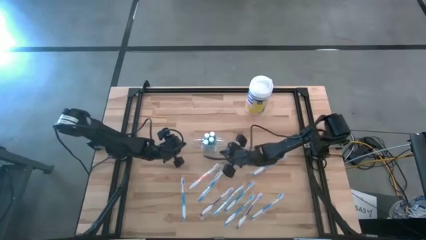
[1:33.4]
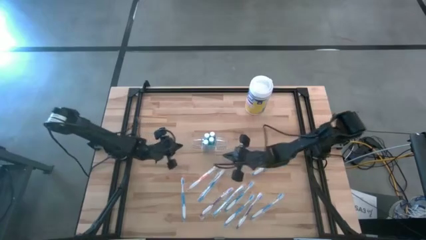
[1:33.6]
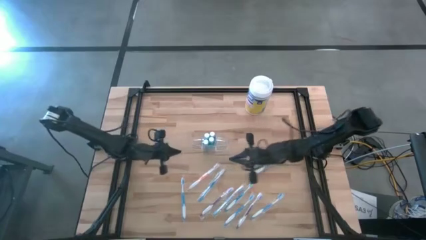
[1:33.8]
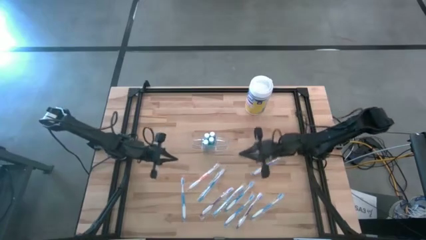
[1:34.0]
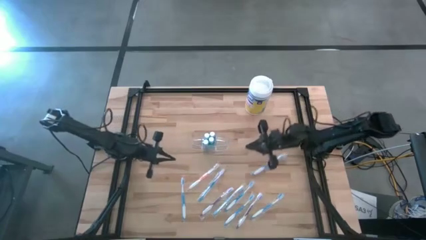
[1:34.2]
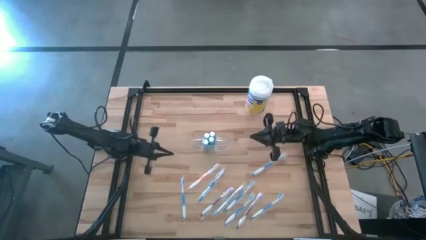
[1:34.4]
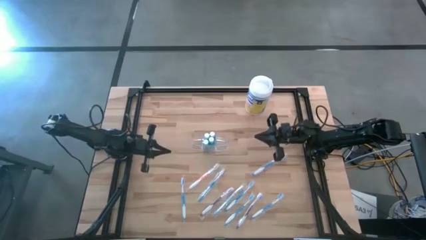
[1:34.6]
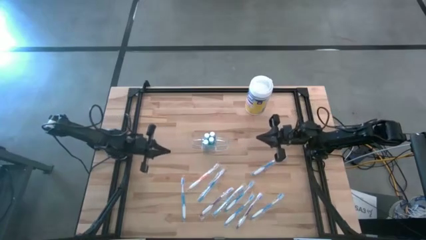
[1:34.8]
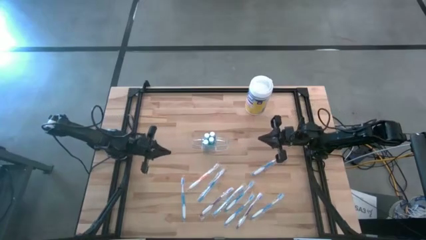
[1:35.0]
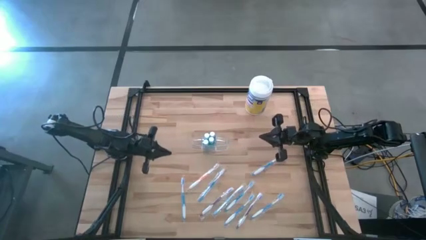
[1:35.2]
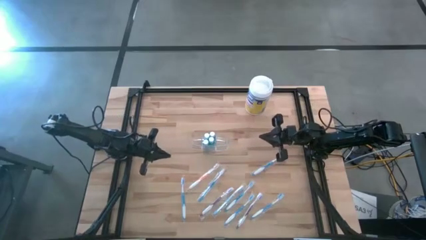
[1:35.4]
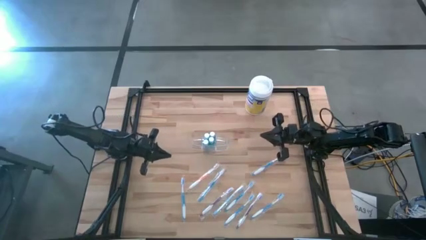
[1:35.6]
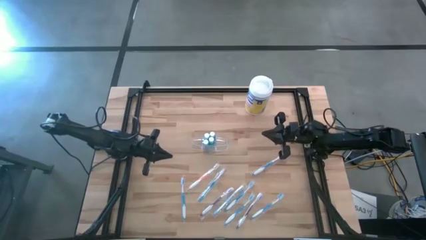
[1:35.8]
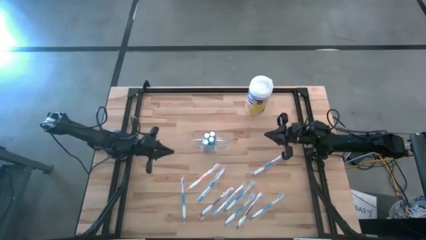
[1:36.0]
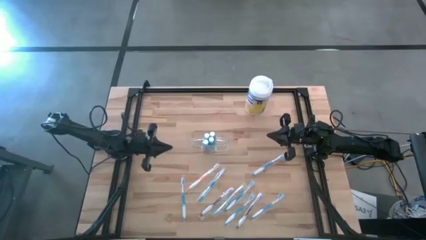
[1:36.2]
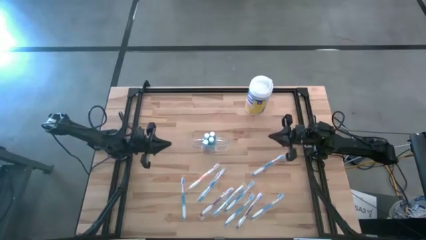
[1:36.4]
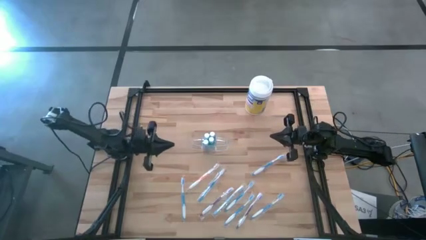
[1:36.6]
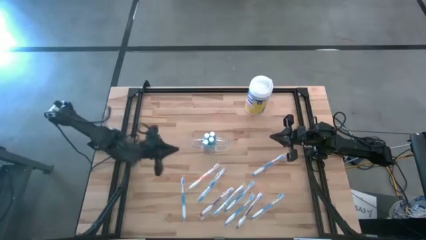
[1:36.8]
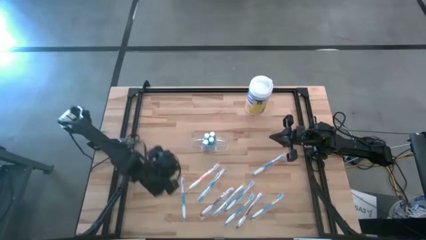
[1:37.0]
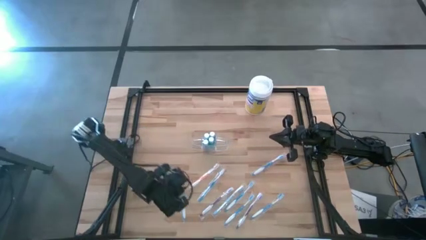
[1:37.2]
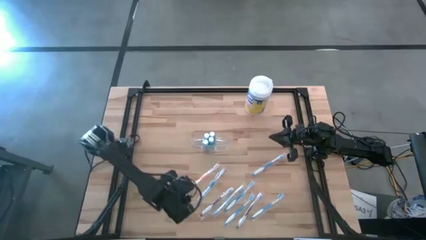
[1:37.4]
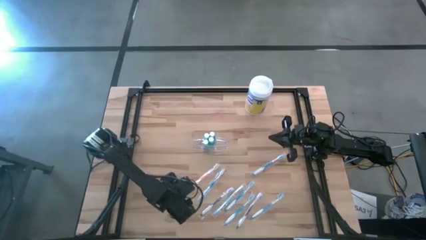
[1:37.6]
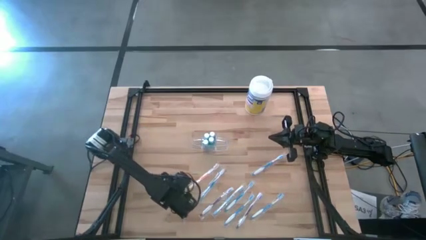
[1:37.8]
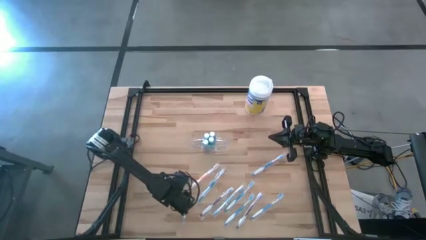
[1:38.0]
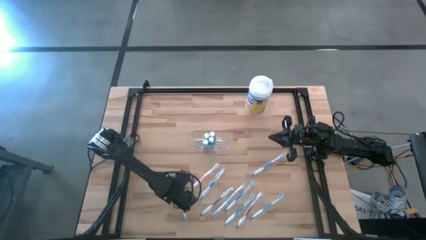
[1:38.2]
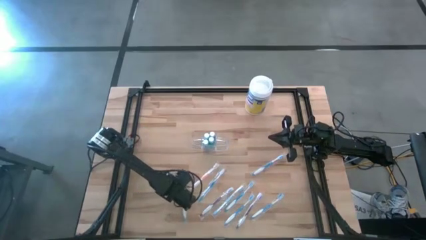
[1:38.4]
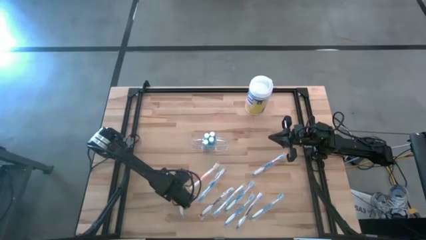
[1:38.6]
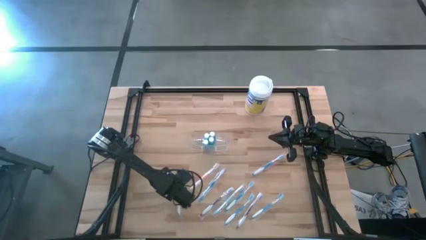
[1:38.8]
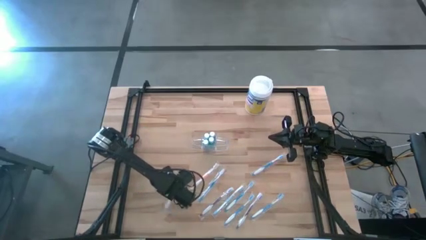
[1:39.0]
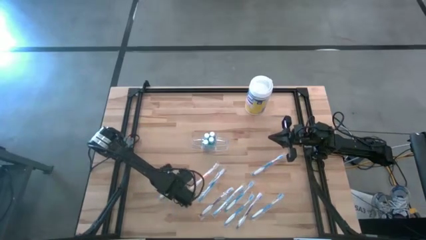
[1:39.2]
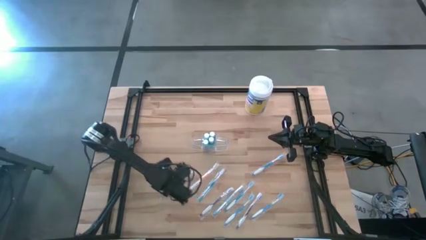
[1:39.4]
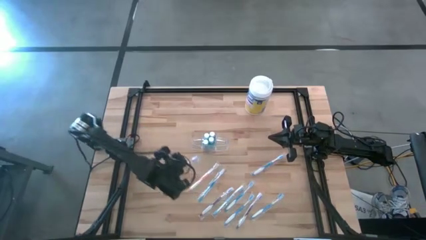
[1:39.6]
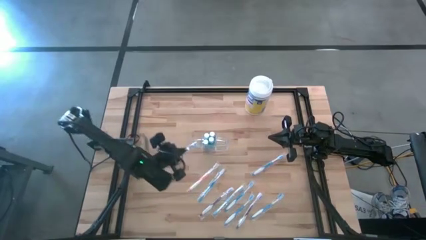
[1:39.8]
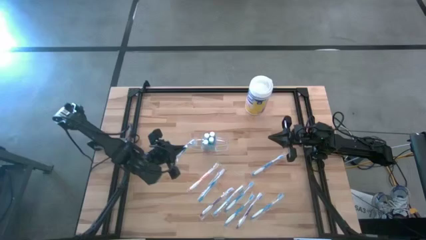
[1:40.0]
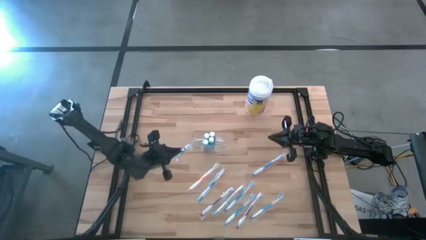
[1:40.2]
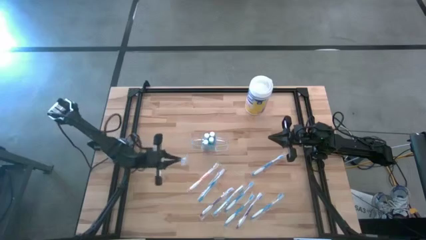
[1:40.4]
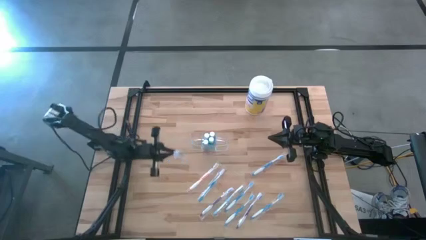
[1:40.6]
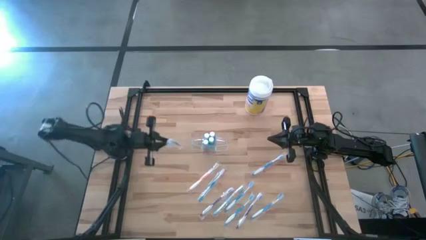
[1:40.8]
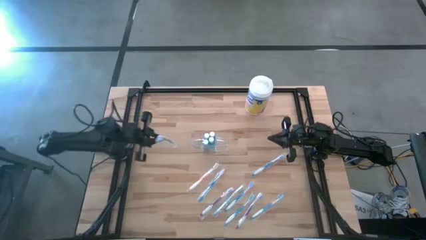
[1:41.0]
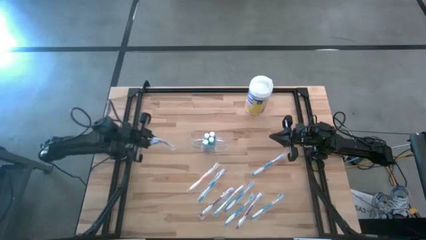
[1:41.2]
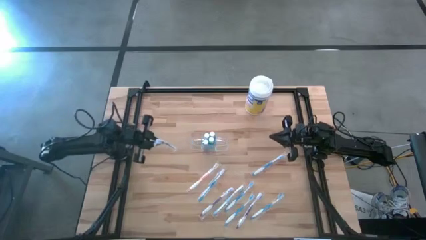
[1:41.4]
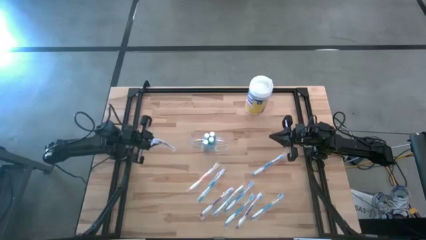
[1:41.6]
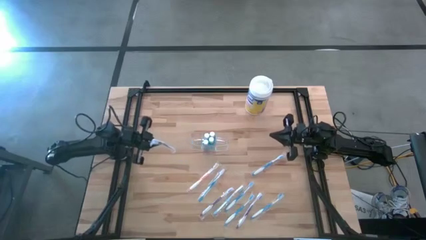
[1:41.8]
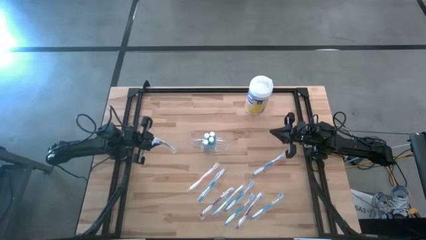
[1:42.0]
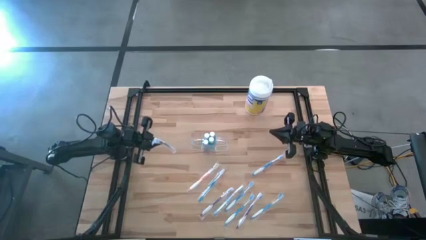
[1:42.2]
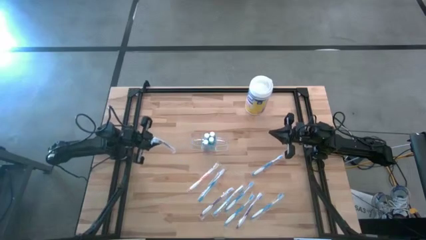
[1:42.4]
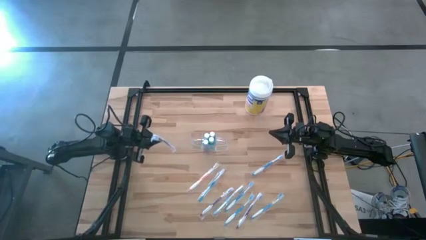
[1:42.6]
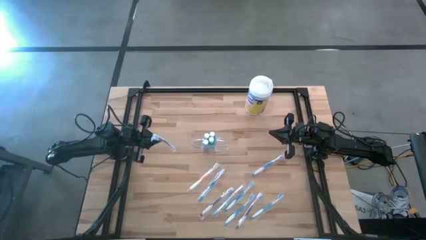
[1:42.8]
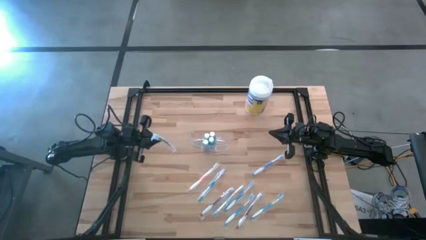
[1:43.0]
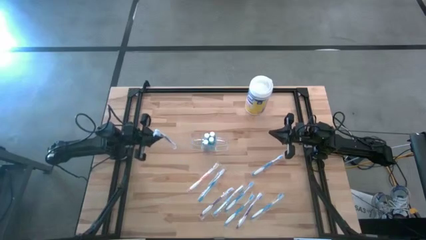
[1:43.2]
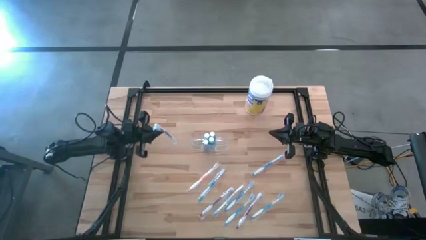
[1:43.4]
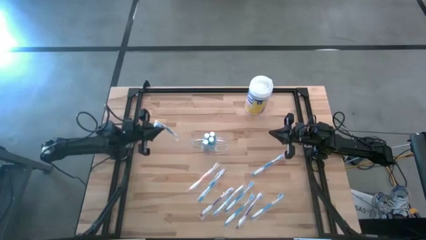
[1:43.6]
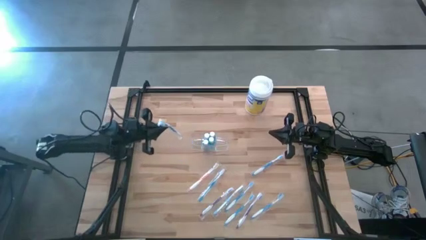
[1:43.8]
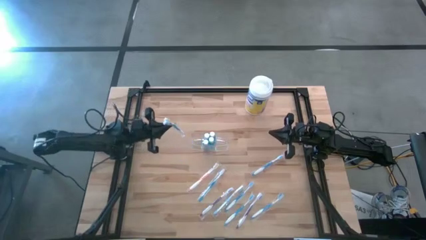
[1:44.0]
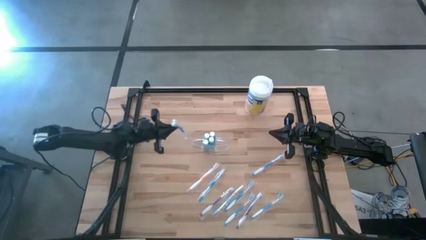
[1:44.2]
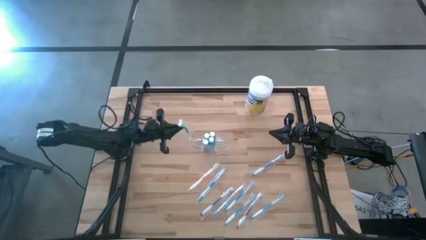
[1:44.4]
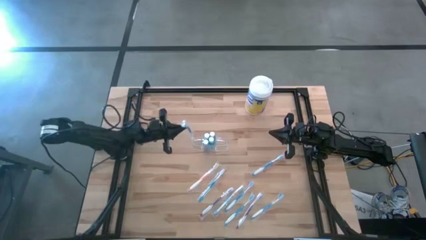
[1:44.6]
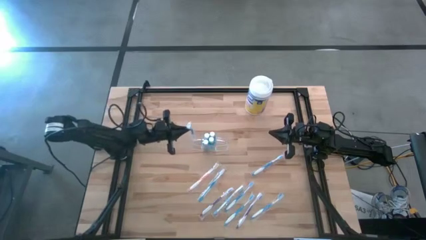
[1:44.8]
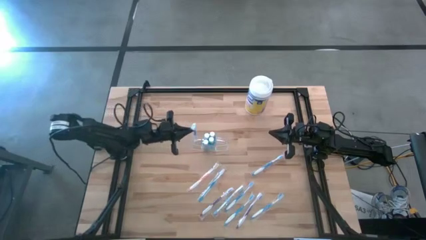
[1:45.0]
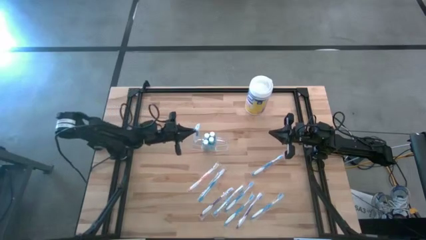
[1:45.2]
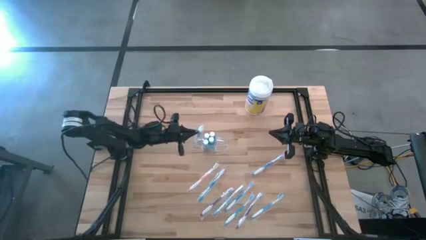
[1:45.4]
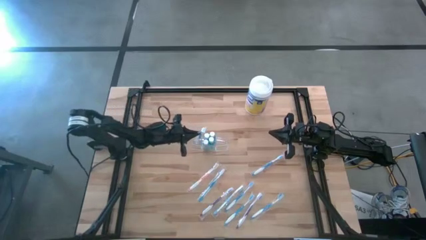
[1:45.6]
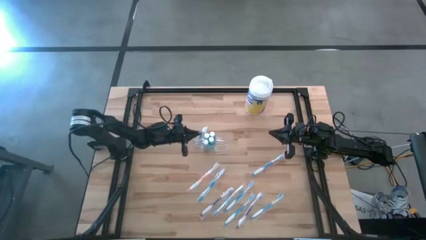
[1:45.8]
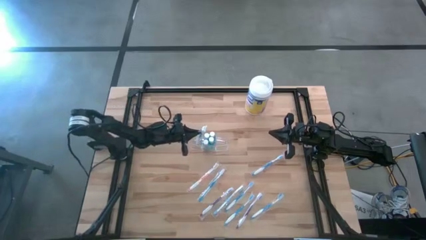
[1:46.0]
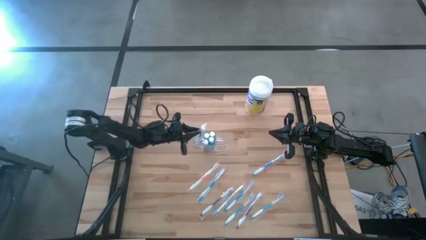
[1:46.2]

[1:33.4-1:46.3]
Task: Pick & Place toothbrushing station
Put the blue toothbrush into the transparent organizer

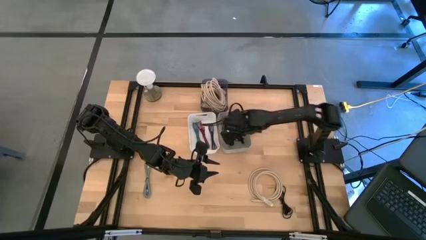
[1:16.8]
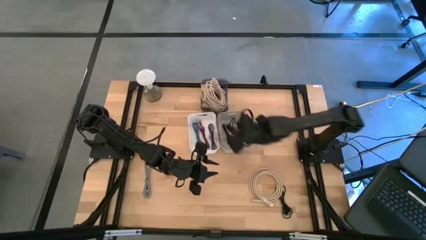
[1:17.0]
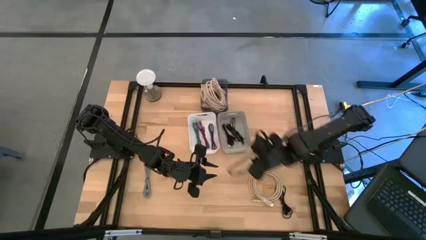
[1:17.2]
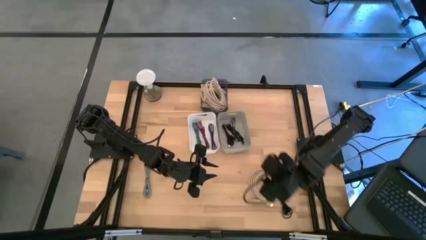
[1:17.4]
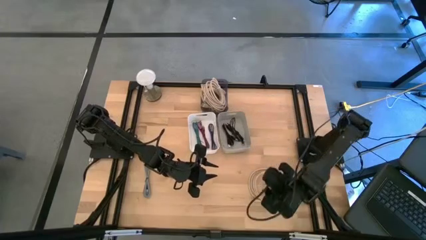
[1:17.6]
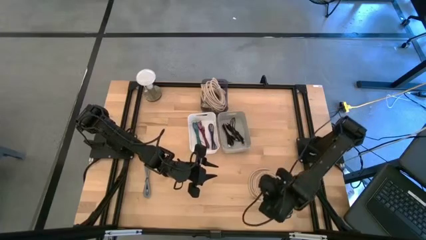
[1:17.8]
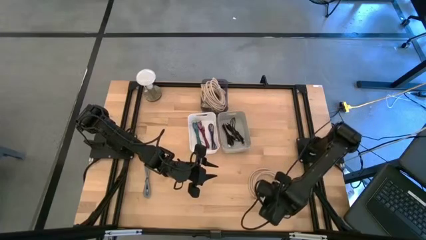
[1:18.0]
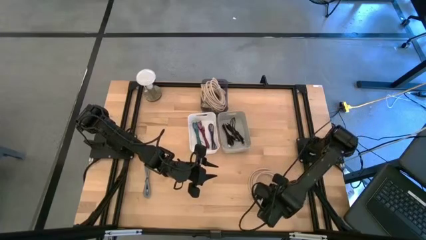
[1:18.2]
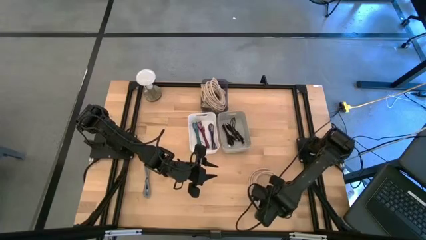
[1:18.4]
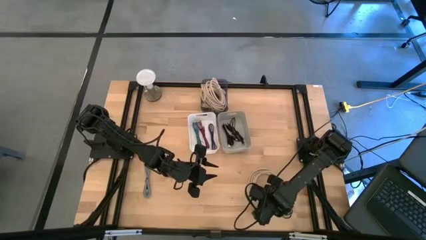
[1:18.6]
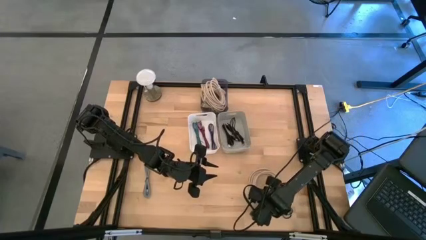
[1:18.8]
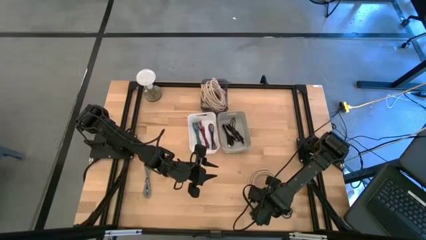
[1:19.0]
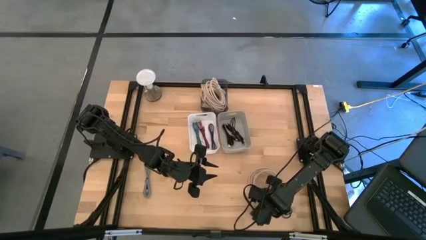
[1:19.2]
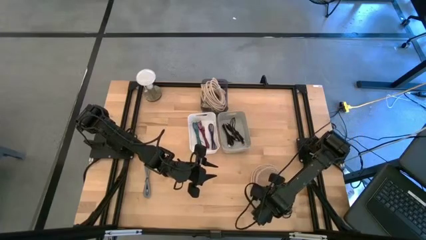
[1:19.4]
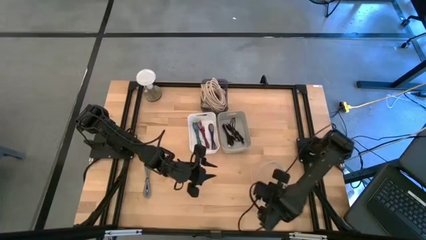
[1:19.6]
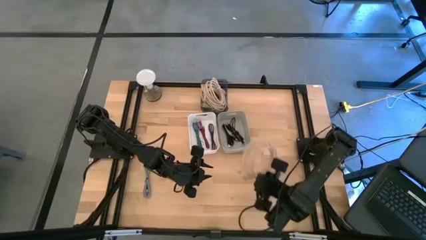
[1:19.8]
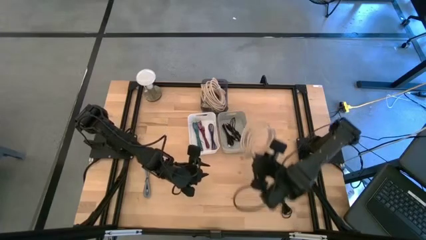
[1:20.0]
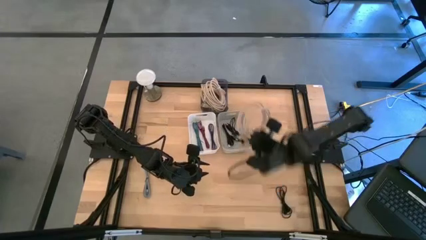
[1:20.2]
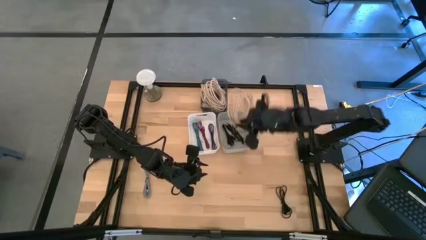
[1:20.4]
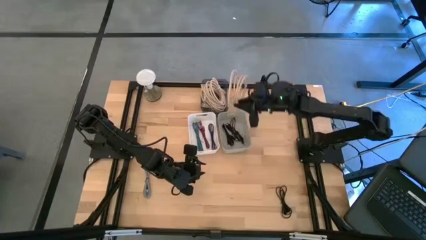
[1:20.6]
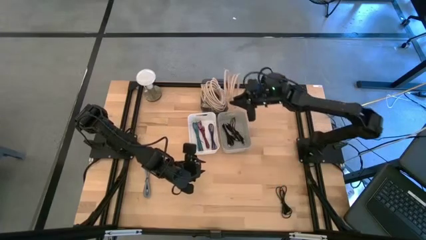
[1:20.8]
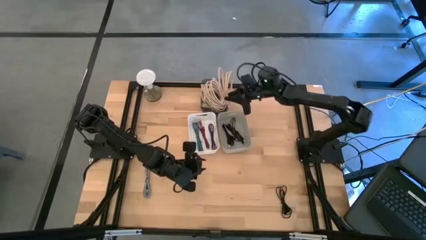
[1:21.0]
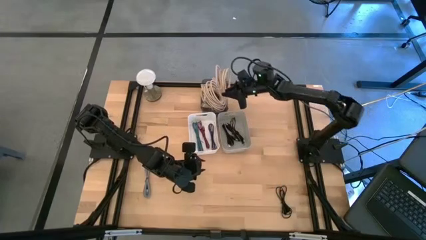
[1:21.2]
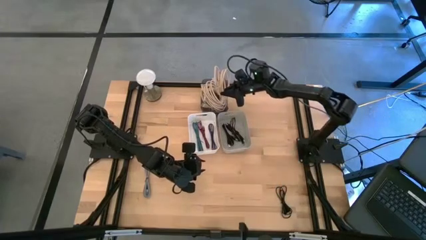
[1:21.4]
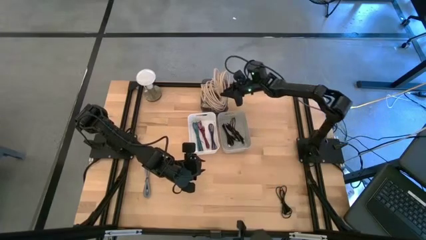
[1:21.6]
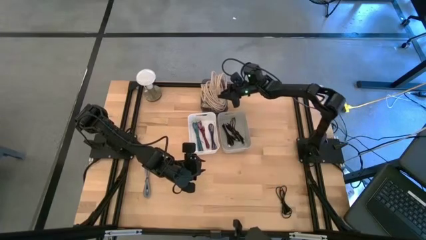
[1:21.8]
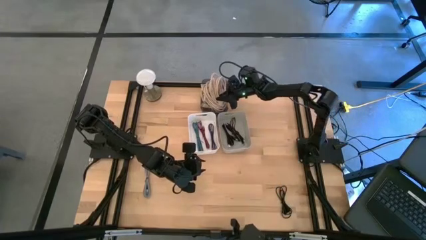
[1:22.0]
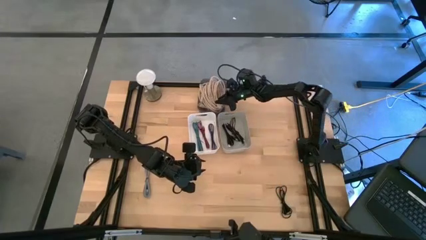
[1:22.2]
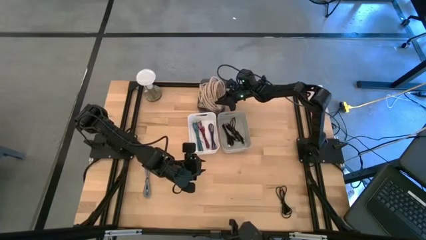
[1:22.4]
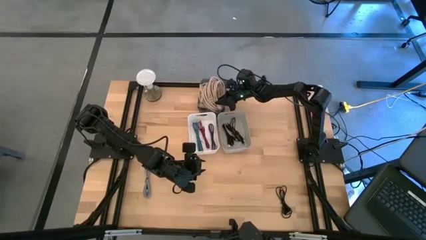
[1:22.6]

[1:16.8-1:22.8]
Task: Pick & Place USB Port
Put the light brown HDMI cable into the black bin
